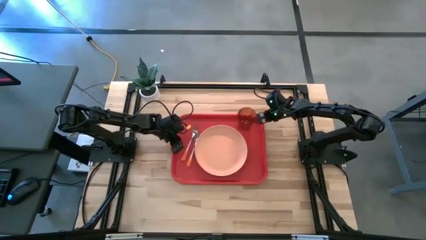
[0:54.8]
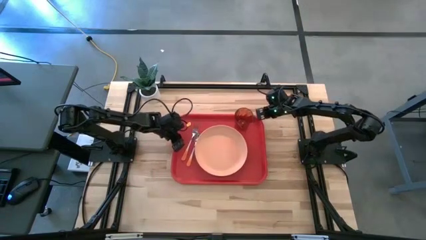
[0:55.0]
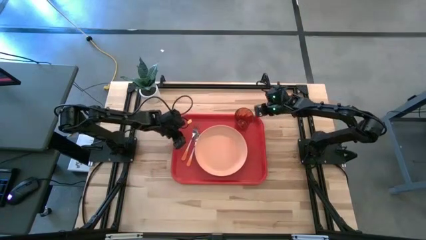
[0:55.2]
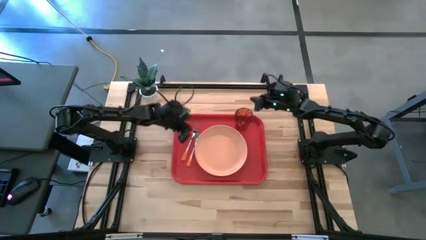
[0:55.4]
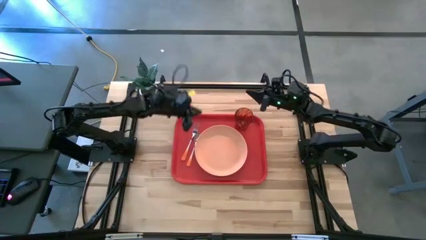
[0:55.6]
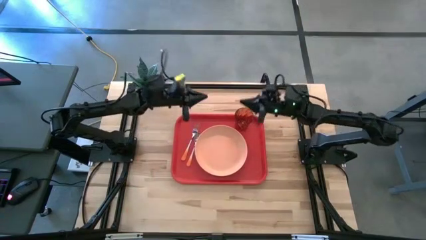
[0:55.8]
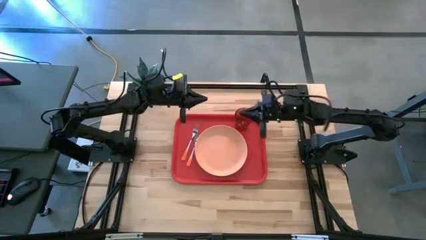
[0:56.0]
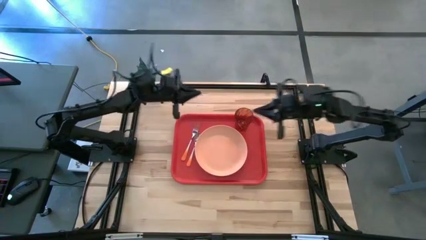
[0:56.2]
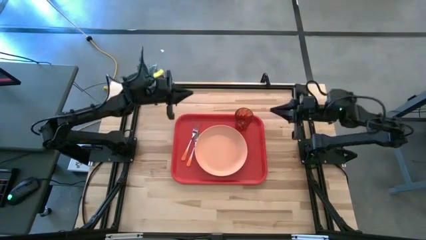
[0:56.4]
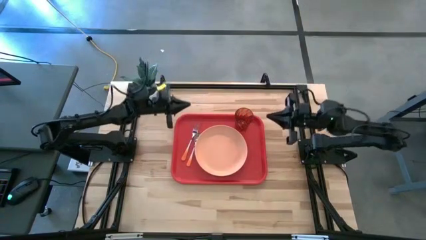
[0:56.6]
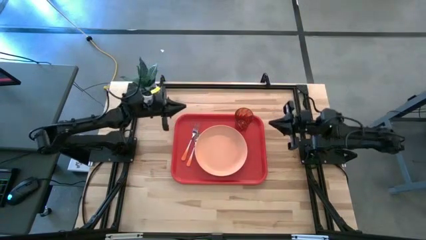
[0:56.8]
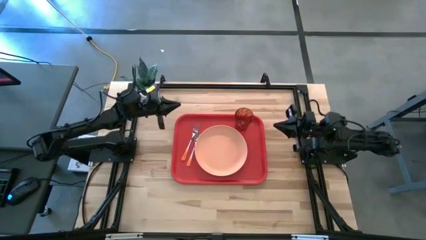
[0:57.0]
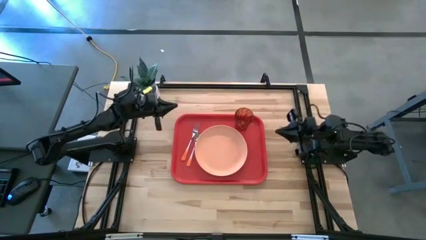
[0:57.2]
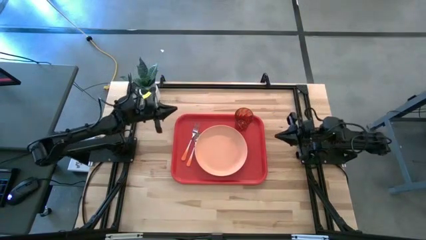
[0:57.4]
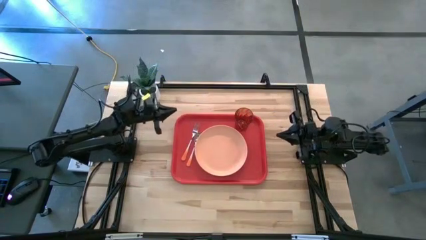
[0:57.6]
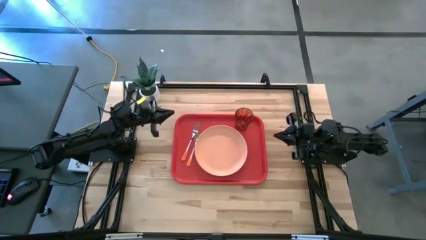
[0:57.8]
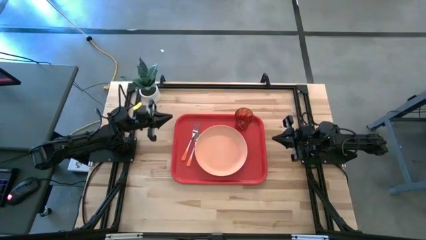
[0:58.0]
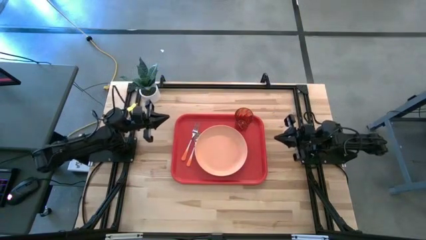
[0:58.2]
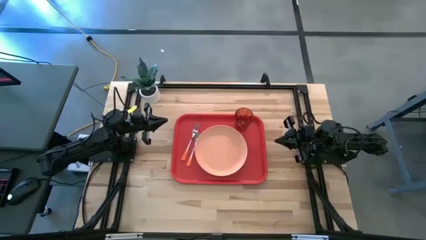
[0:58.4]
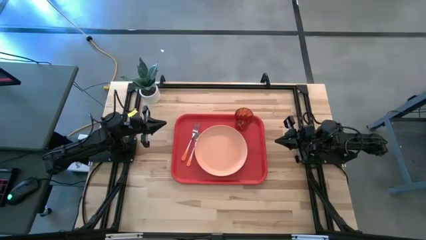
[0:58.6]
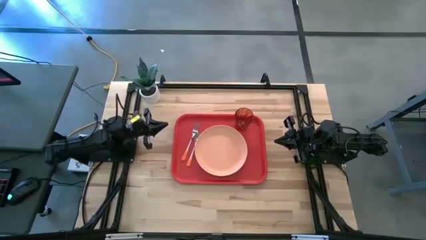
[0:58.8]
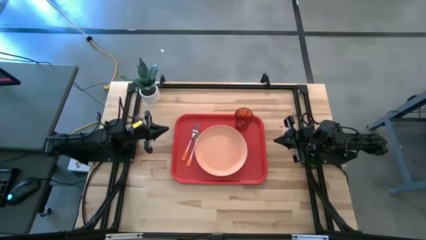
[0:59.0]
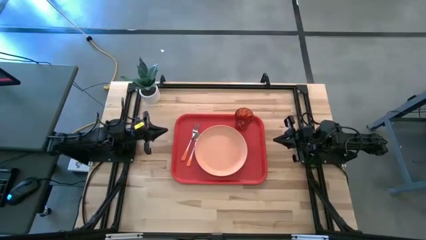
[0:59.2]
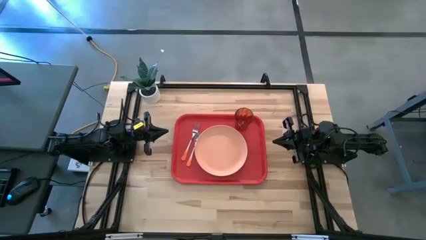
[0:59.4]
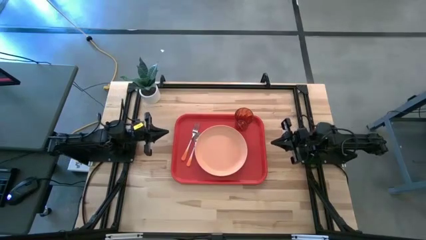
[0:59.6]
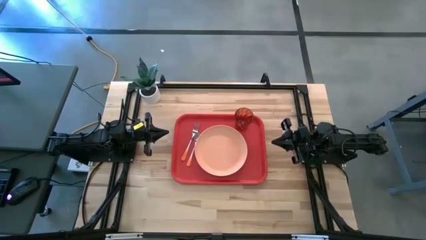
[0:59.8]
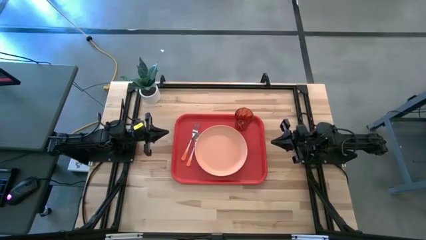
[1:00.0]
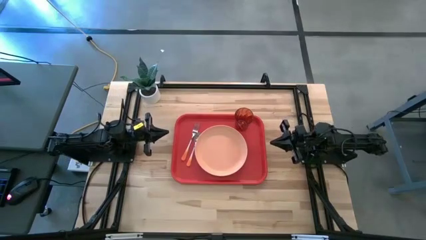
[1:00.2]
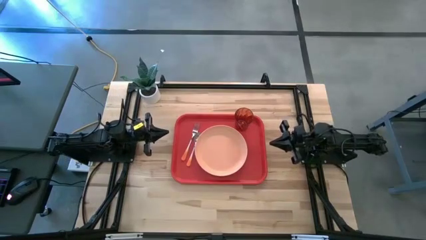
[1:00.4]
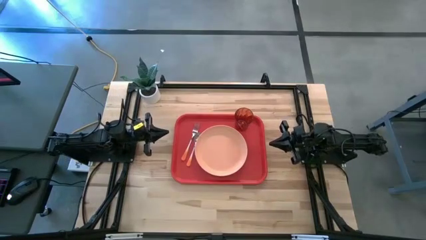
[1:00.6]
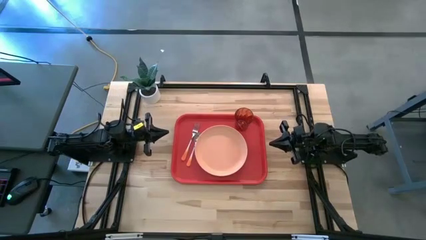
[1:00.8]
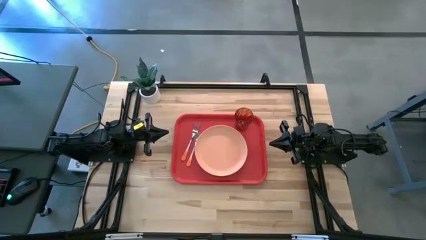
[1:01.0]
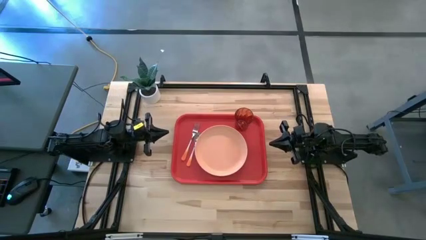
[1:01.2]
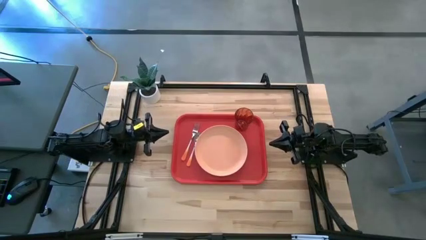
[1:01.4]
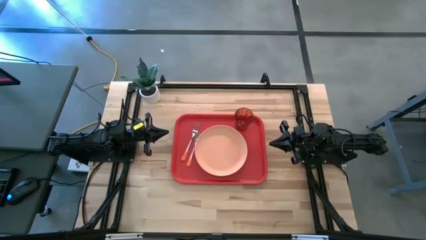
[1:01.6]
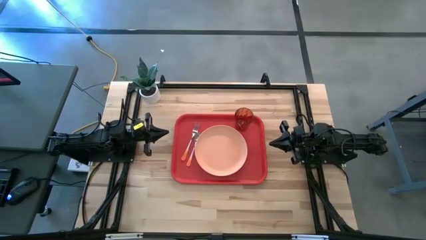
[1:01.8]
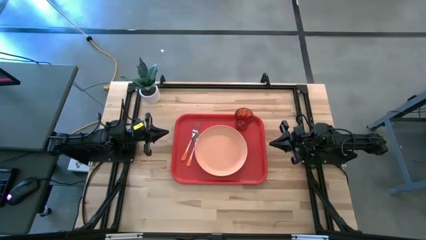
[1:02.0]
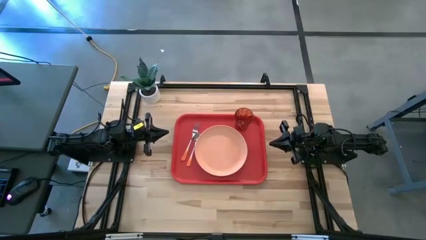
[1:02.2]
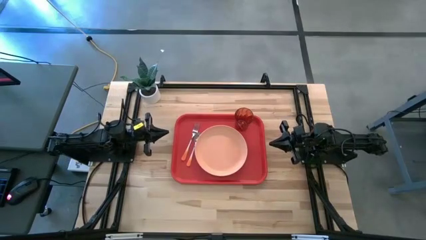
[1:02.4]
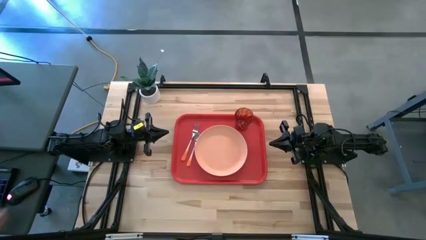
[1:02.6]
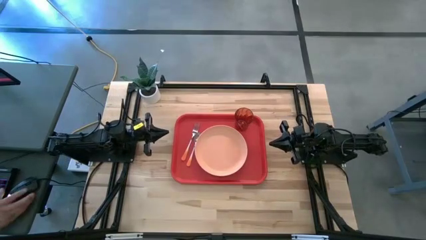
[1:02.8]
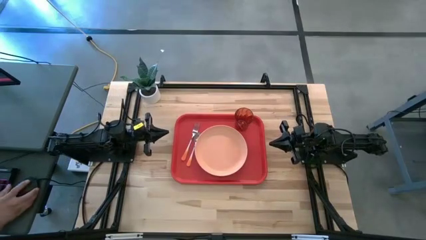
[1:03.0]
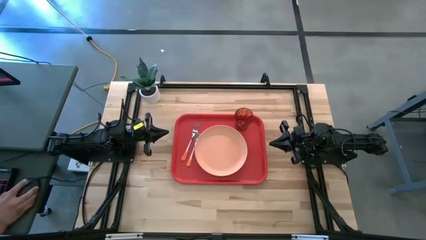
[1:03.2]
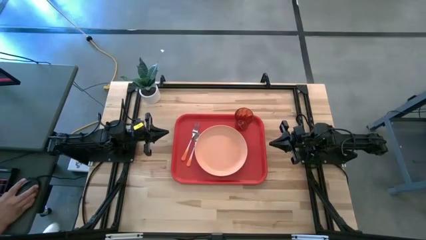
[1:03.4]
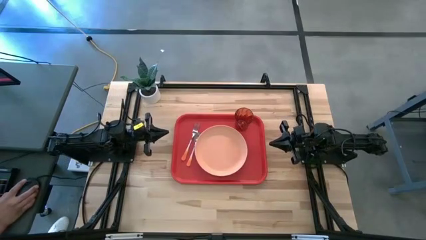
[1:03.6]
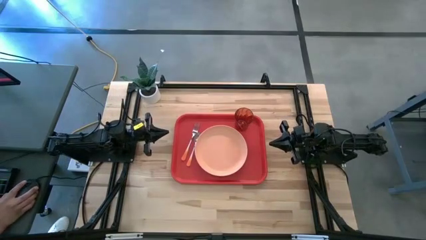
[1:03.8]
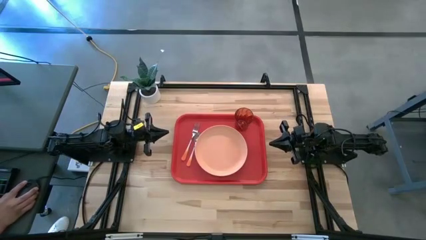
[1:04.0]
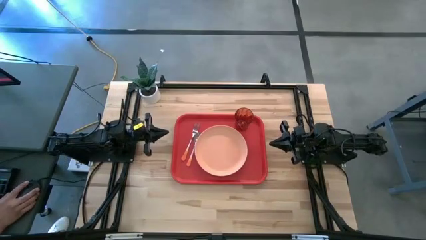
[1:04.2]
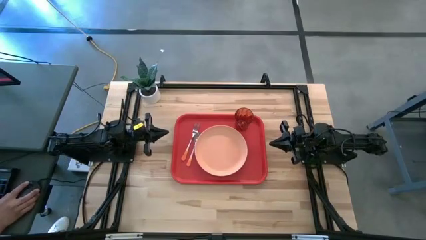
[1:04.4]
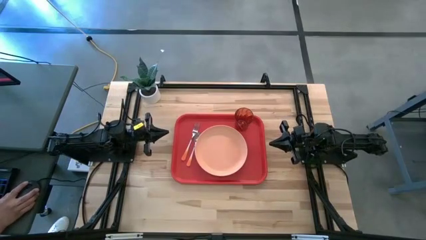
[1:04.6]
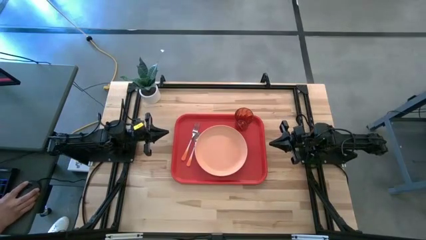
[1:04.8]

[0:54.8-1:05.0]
Task: Pick and place plate/cup/fork/spoon on tray
Return to home position
